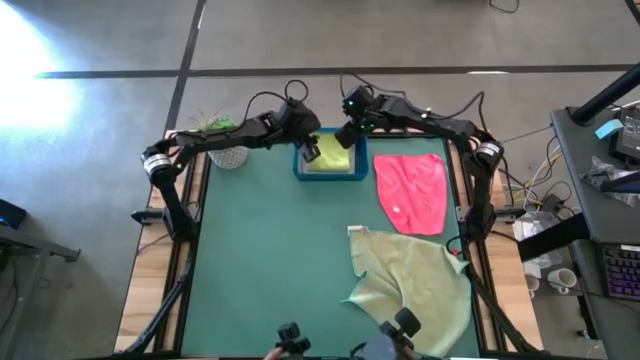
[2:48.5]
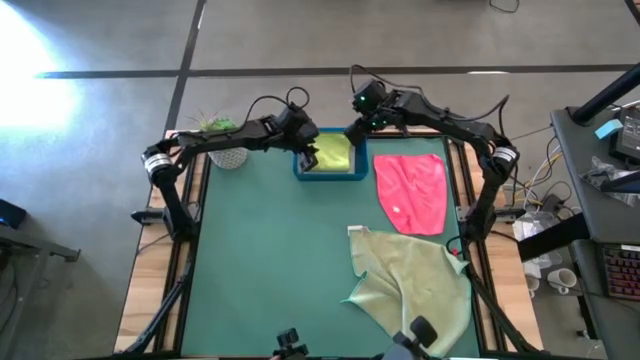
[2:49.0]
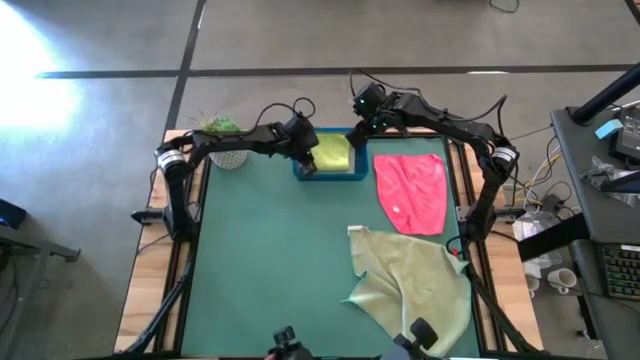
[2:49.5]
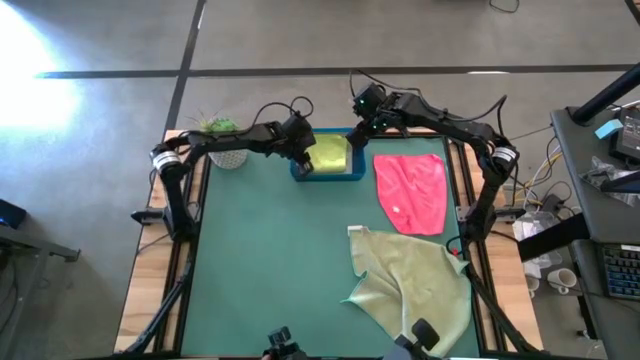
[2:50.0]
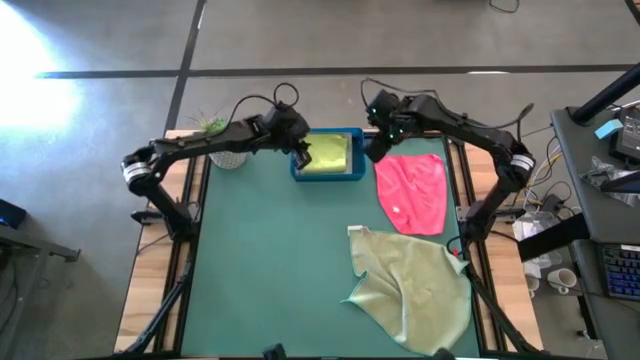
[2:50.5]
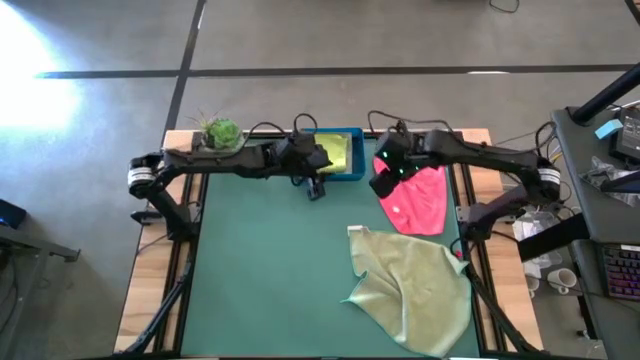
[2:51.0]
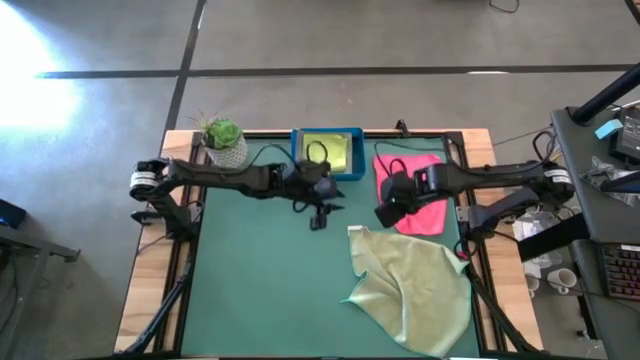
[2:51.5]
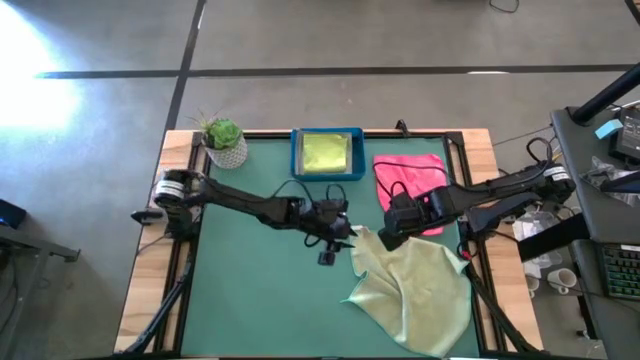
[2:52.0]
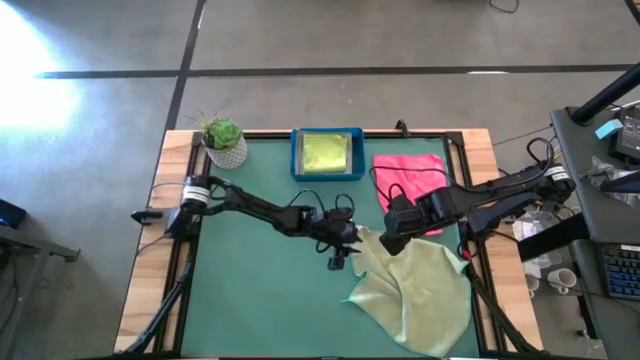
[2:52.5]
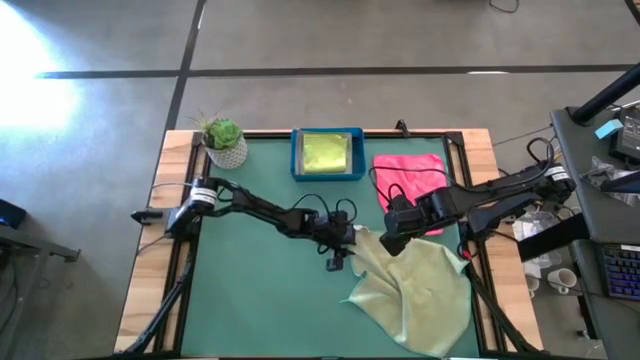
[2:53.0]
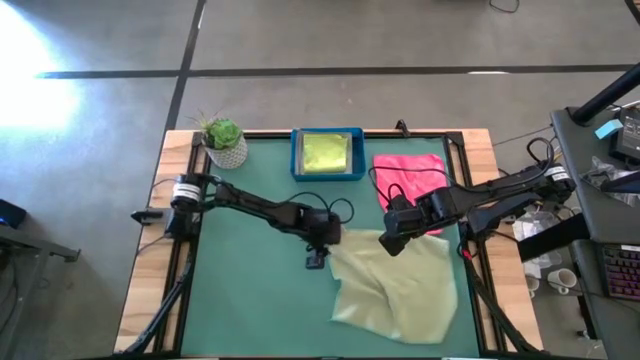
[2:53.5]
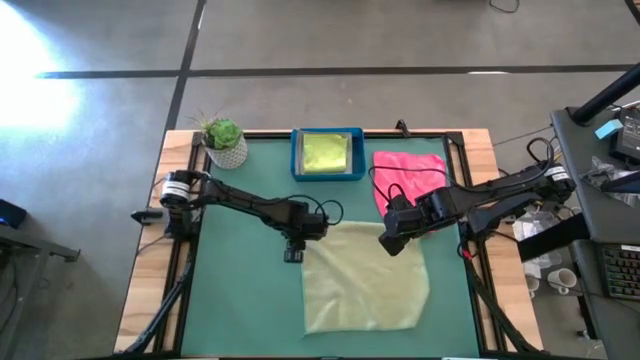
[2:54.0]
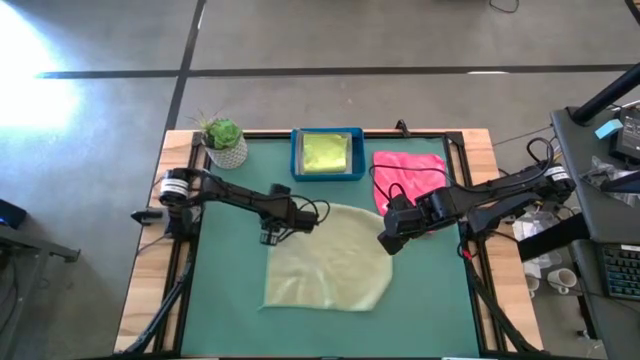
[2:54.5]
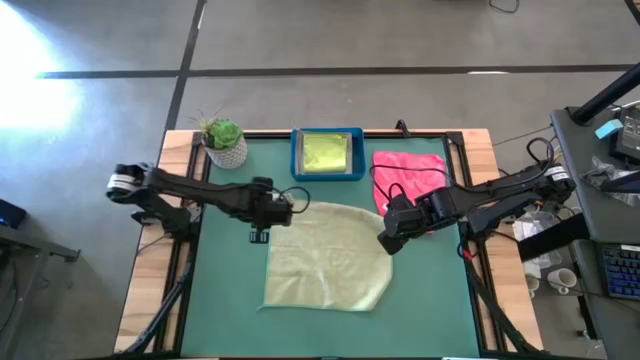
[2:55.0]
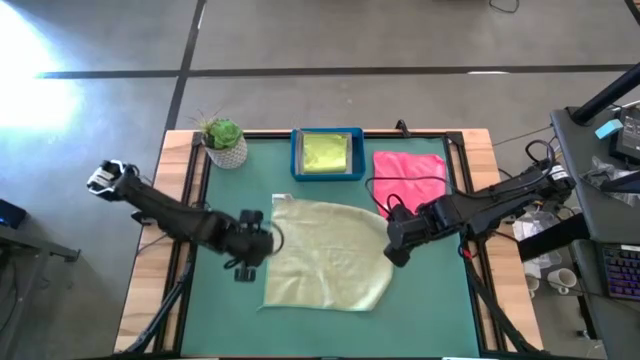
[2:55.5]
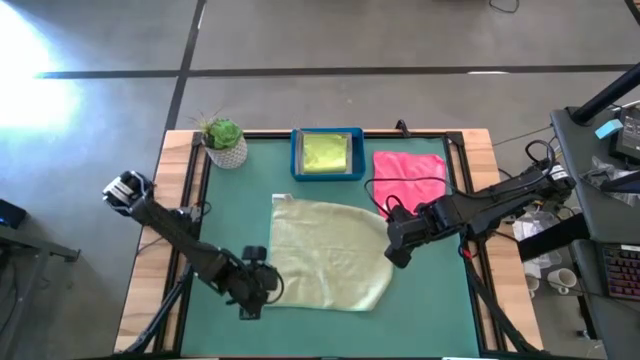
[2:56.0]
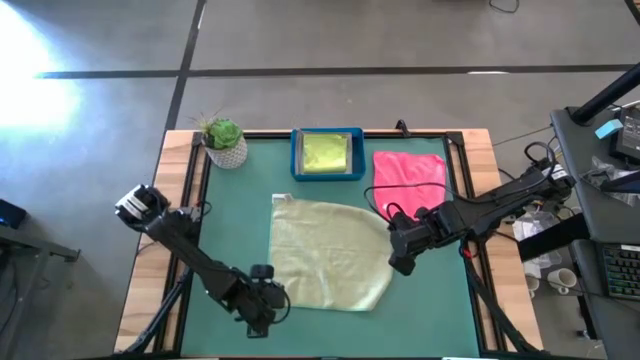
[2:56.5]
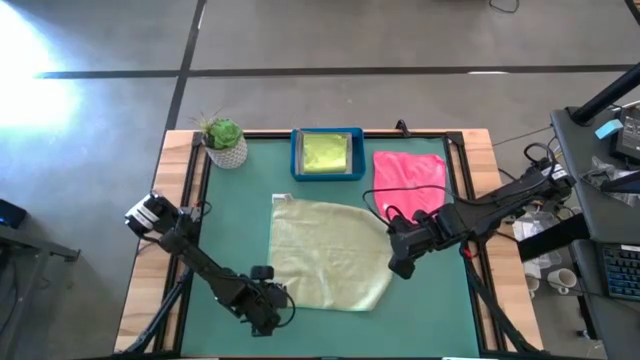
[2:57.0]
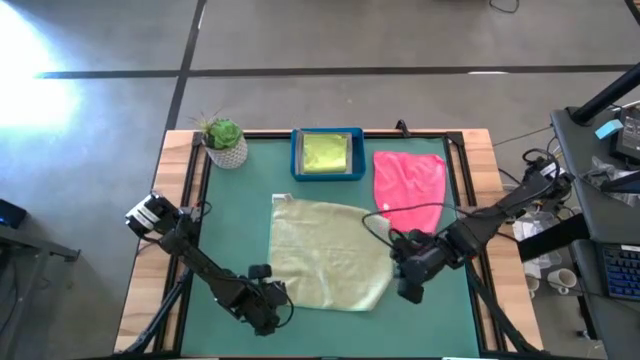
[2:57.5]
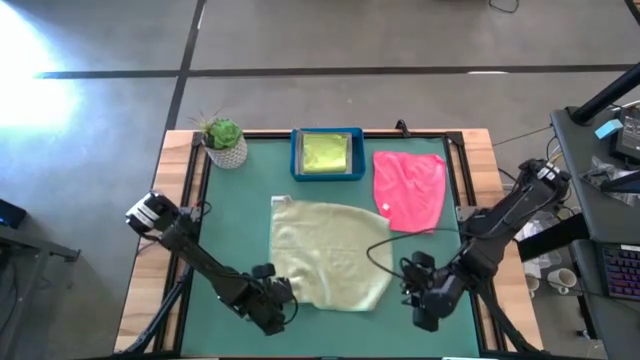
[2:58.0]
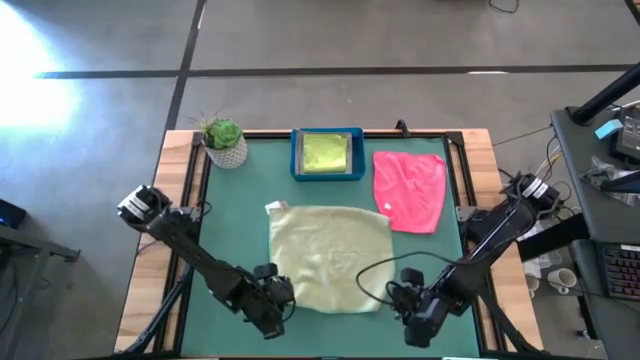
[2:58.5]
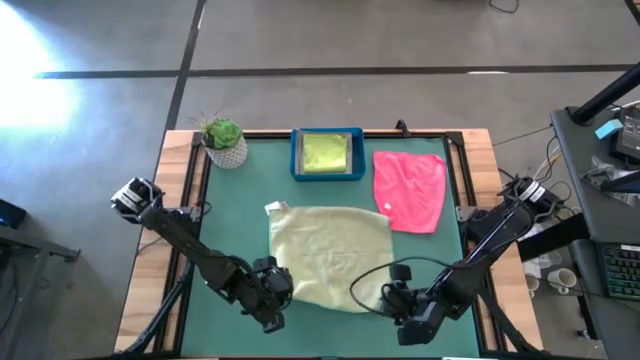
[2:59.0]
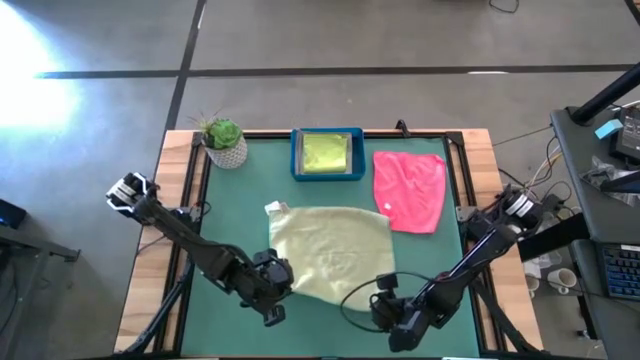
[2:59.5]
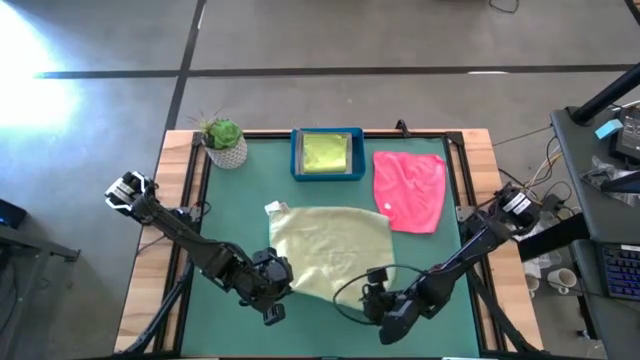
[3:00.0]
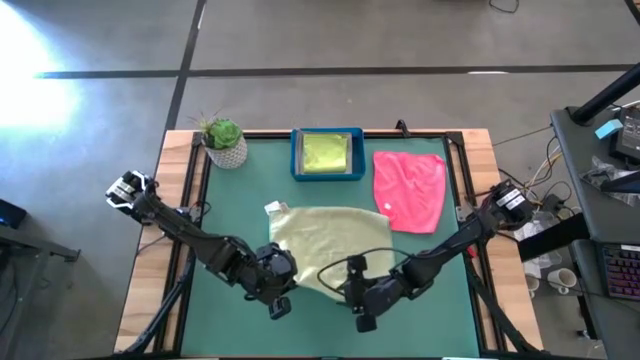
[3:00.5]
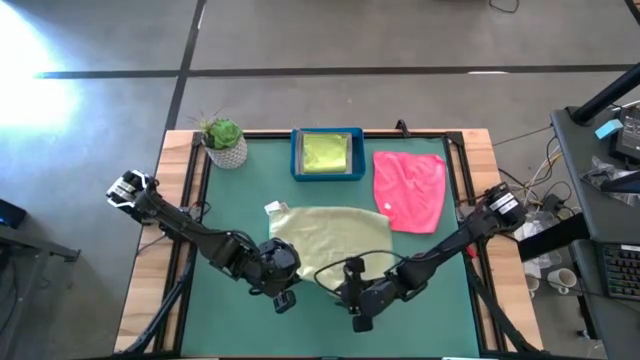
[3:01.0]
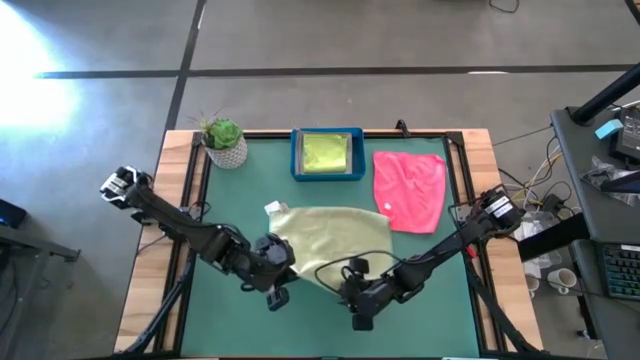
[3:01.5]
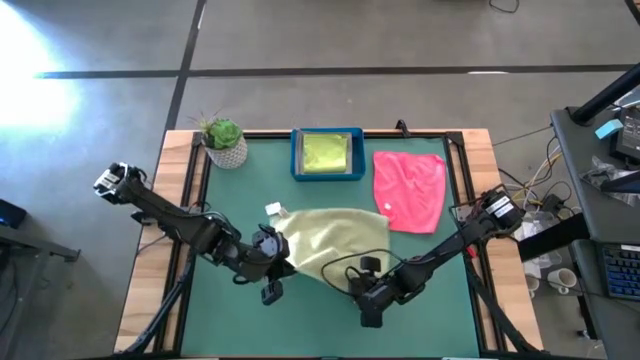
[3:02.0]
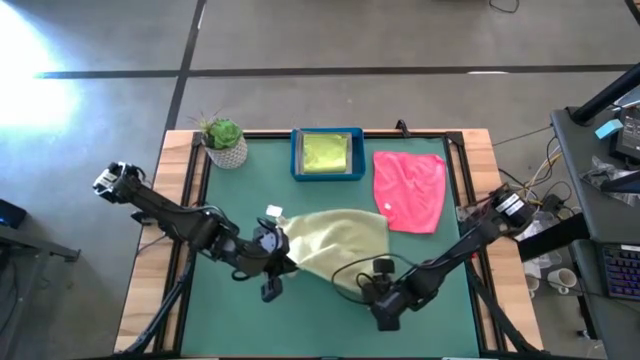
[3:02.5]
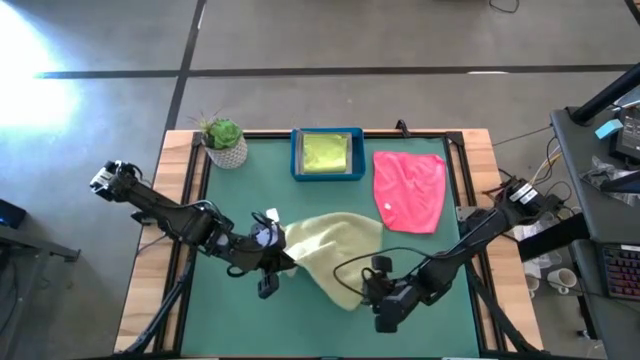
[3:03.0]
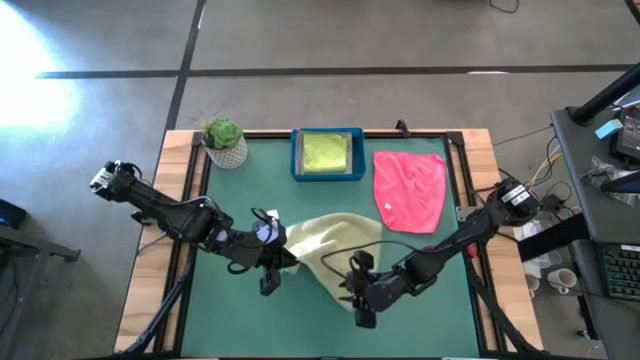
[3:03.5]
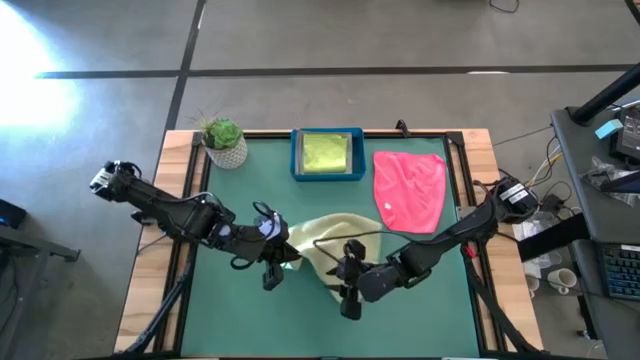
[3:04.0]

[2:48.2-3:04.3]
Task: Fold microfiber towels
Fold the dark green microfiber cloth

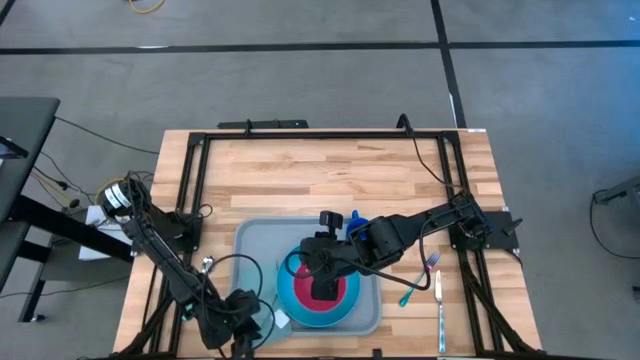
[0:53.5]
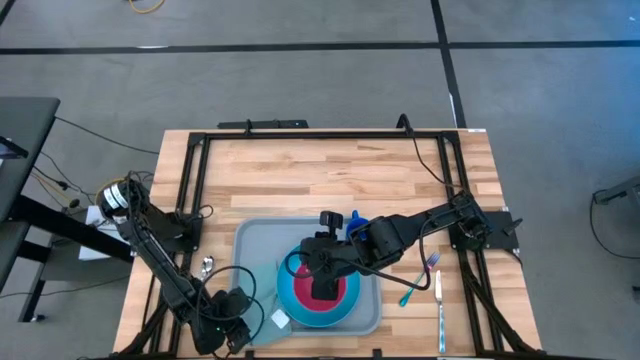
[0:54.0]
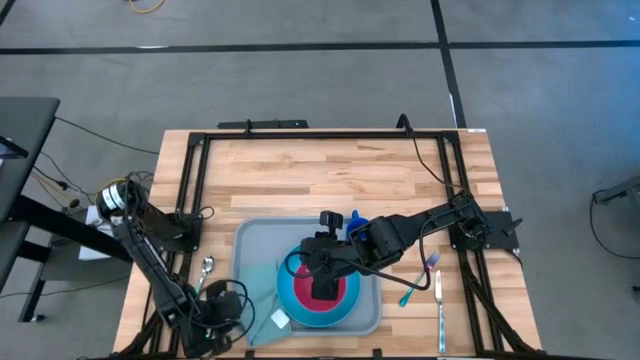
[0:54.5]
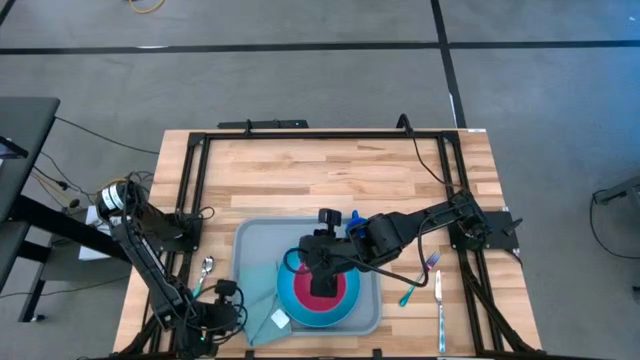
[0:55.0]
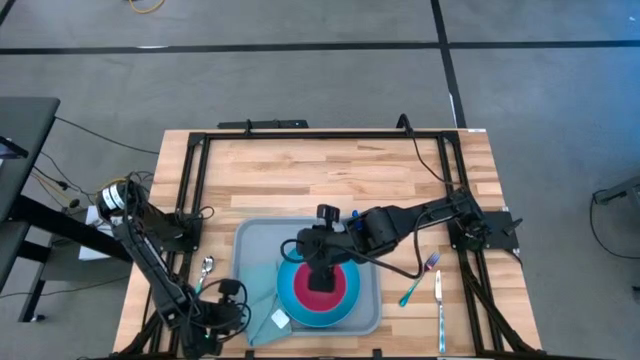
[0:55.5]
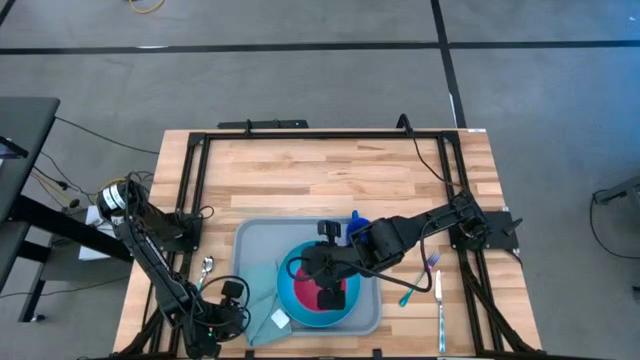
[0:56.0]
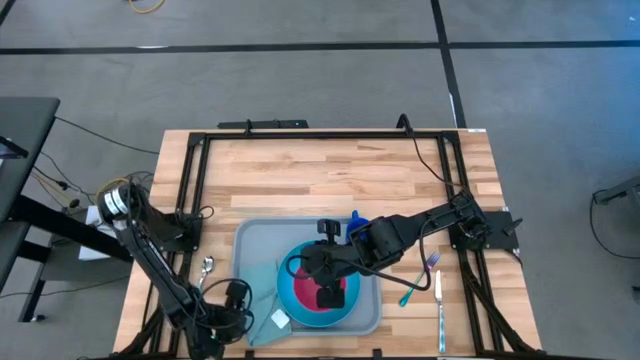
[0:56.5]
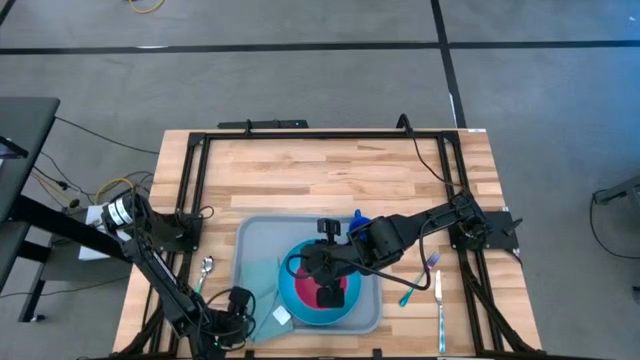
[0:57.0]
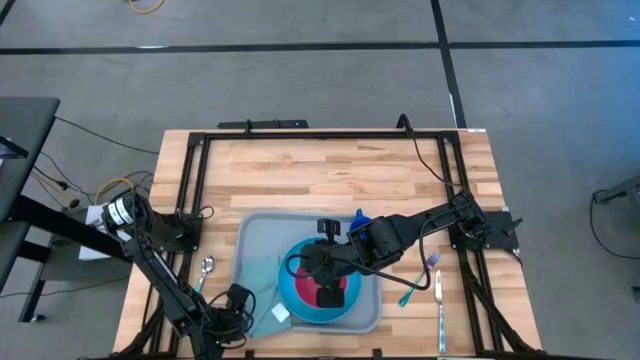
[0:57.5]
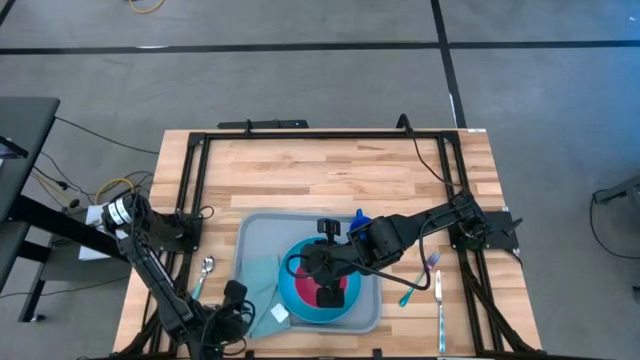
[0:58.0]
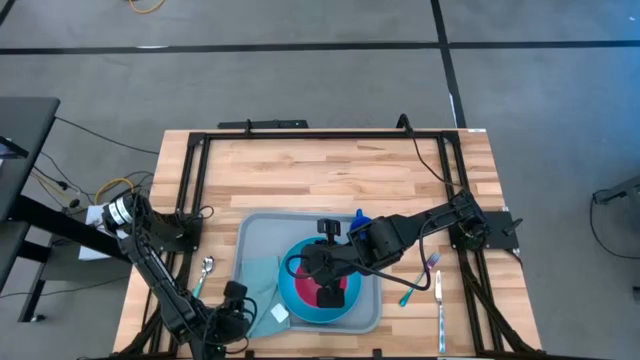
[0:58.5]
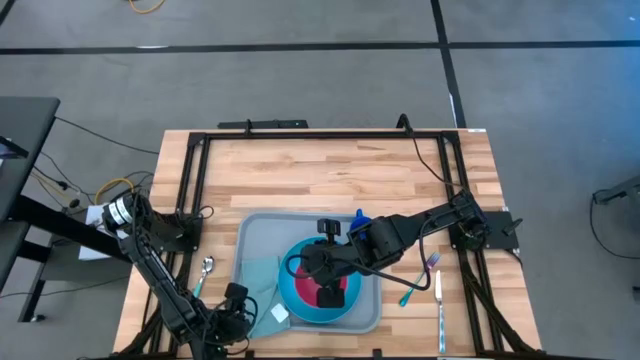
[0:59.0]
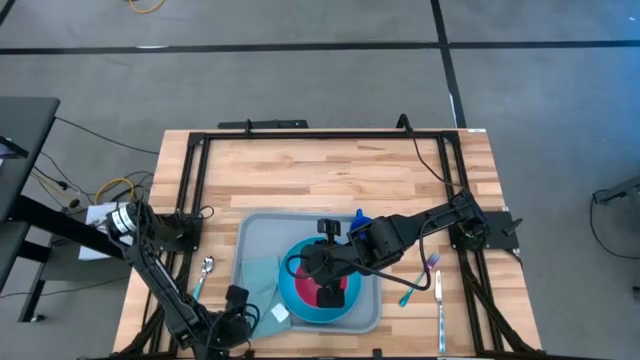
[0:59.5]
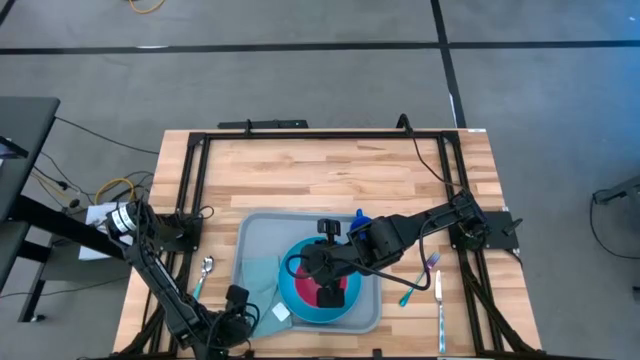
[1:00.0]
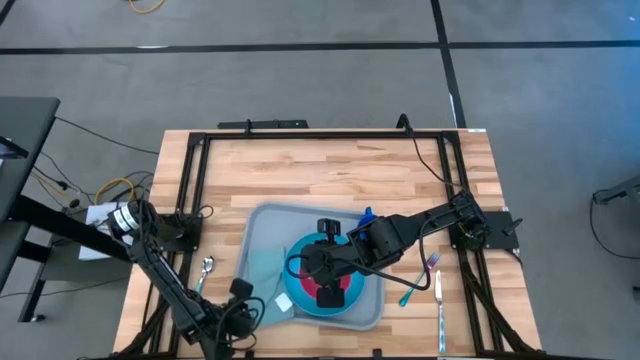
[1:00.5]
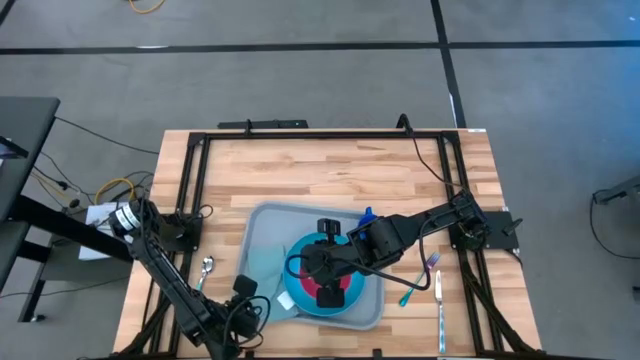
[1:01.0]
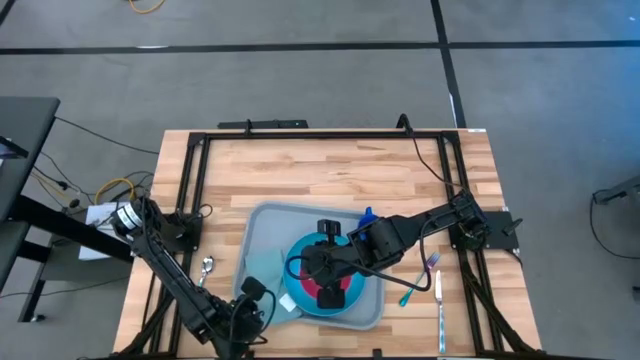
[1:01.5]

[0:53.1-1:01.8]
Task: Set up tray
Adjust the green napkin on the gray tray
